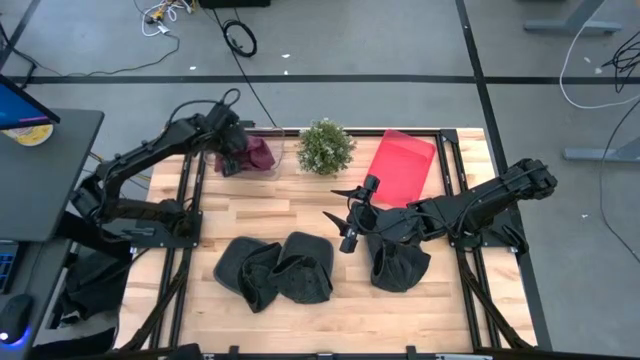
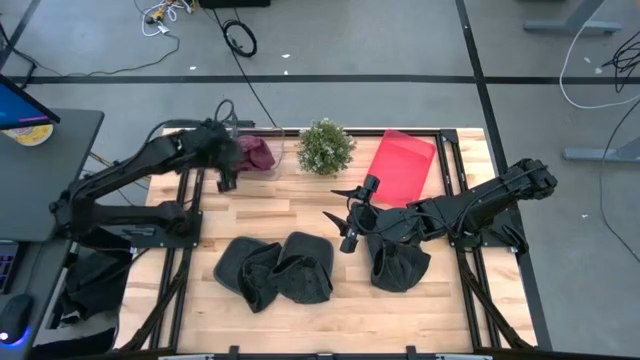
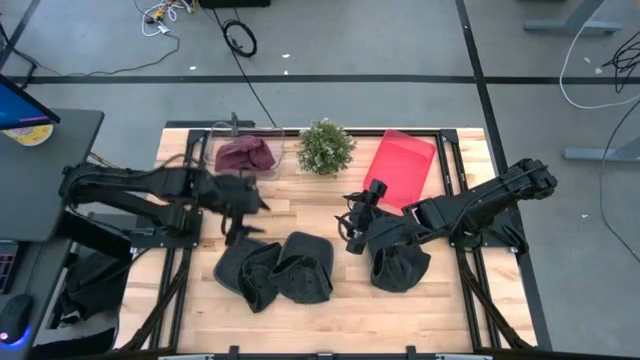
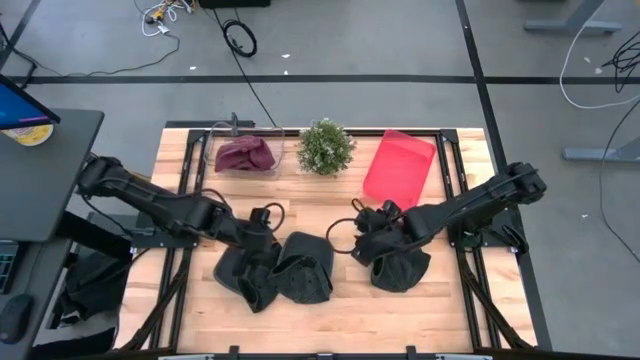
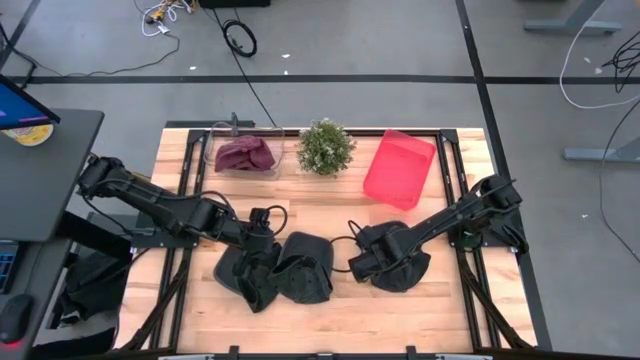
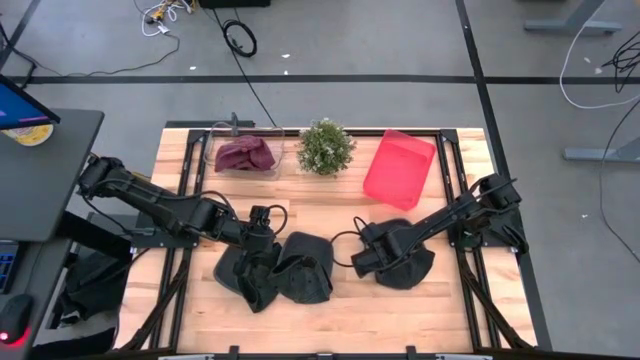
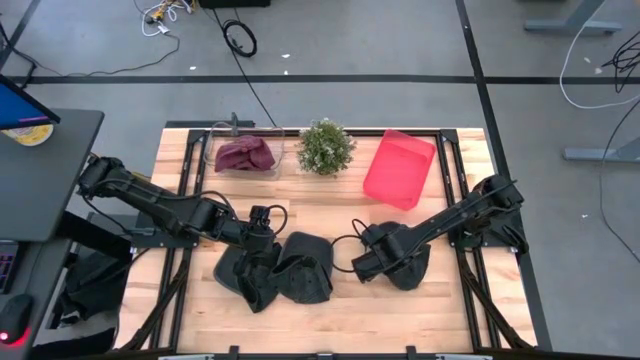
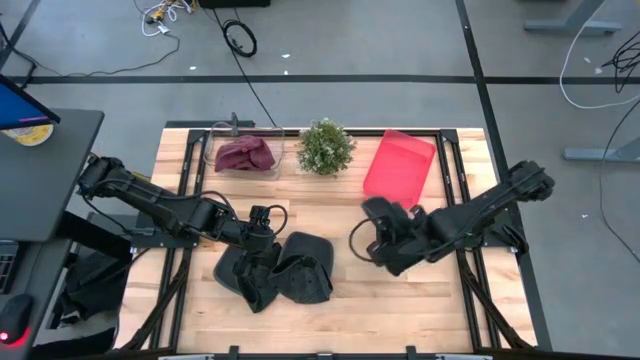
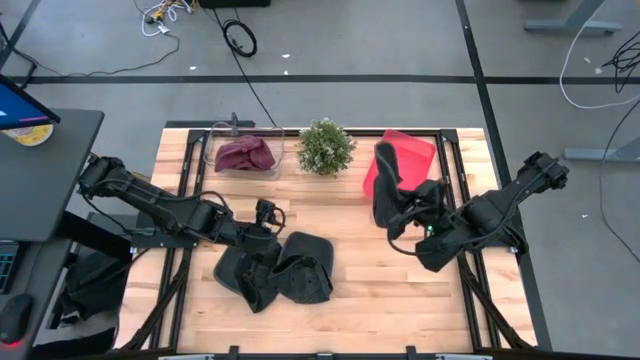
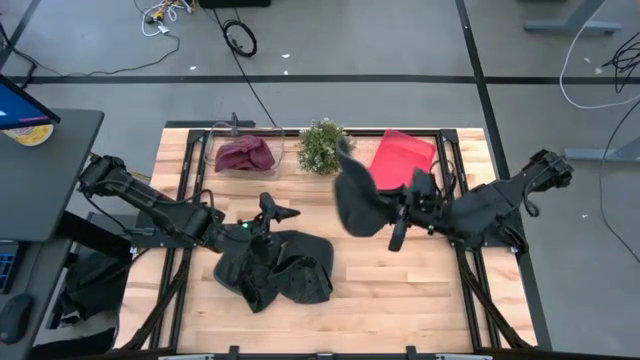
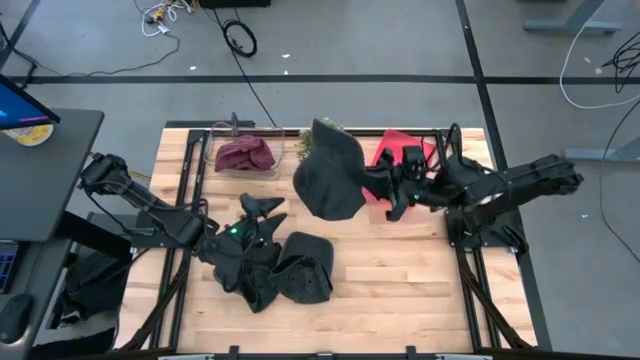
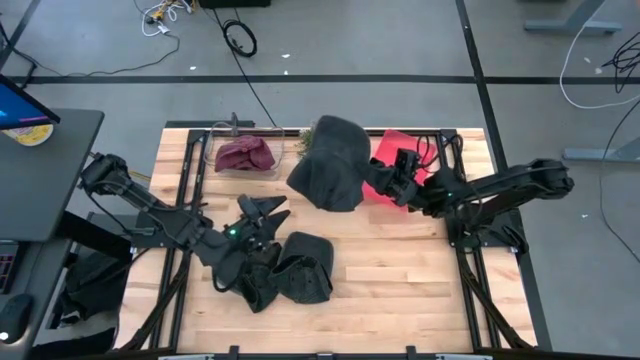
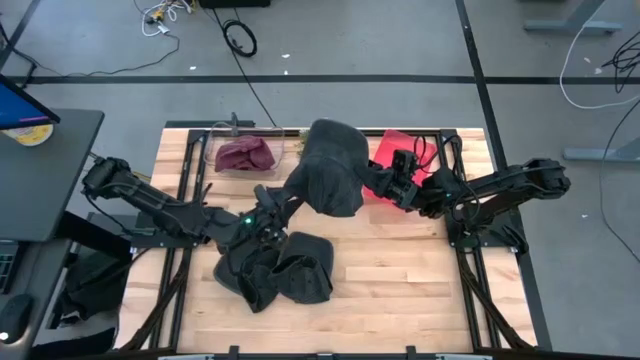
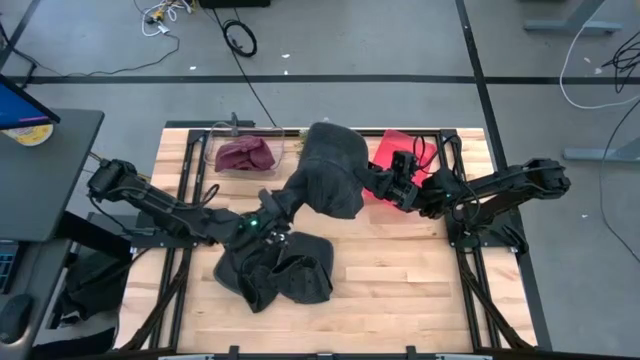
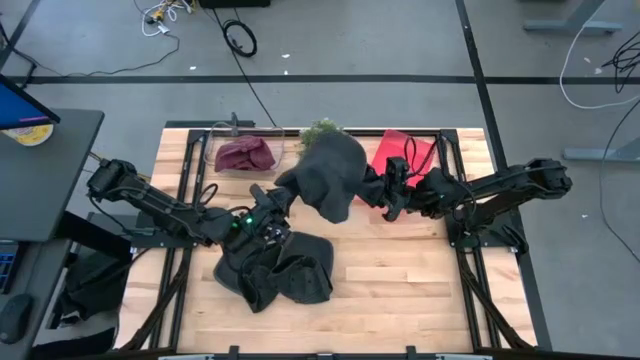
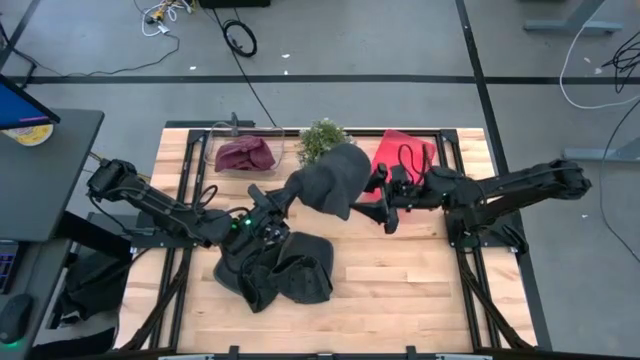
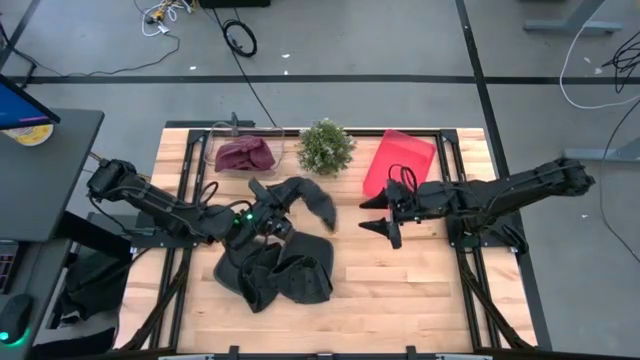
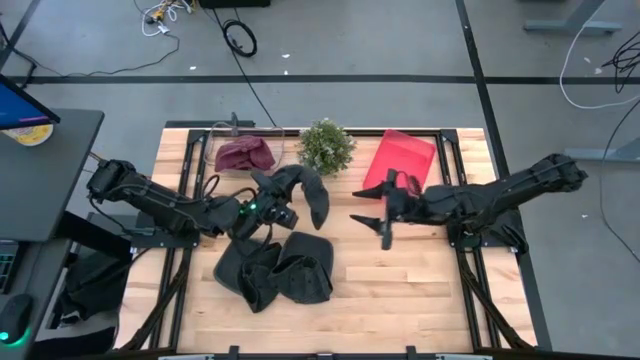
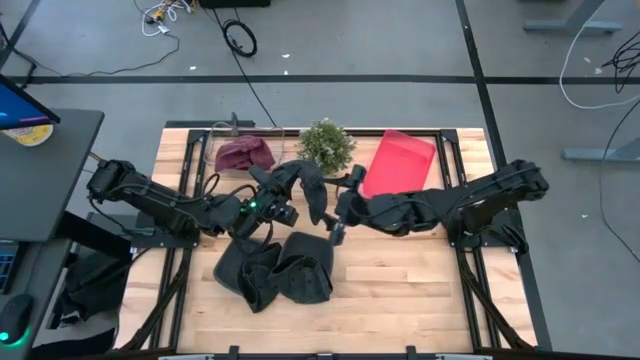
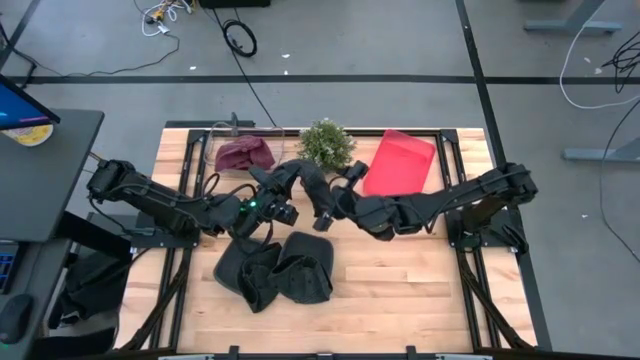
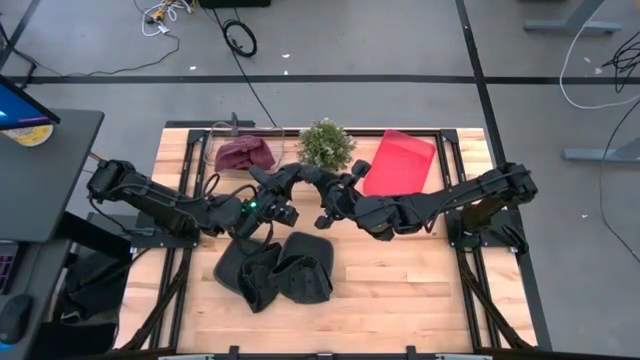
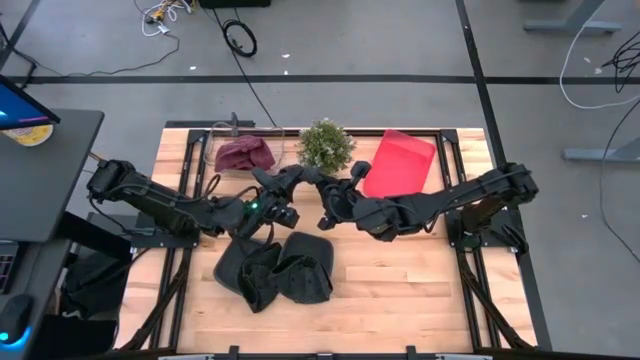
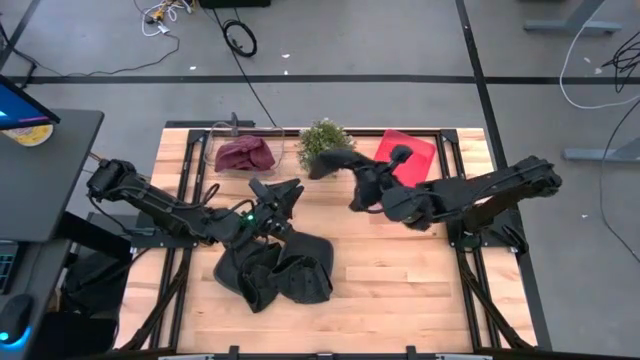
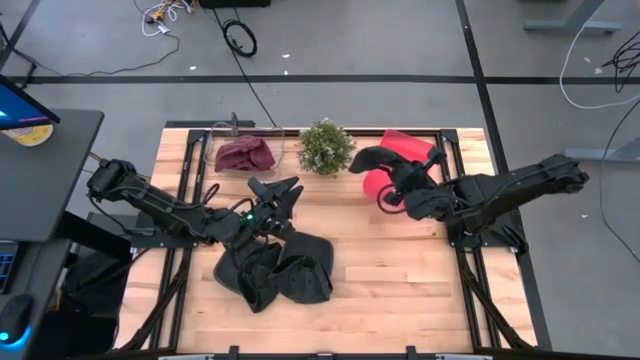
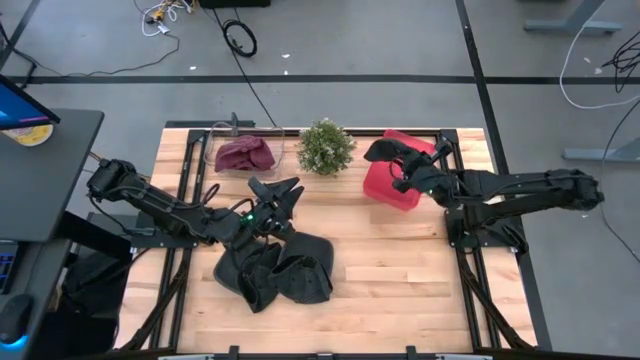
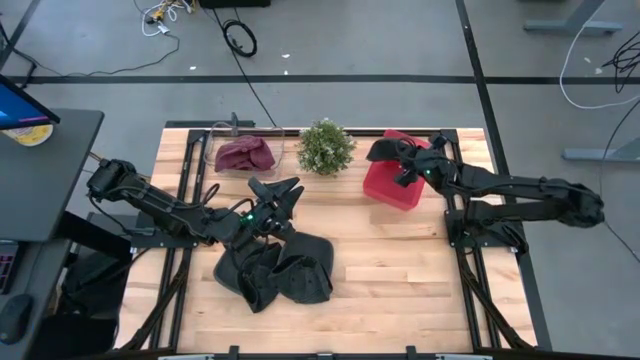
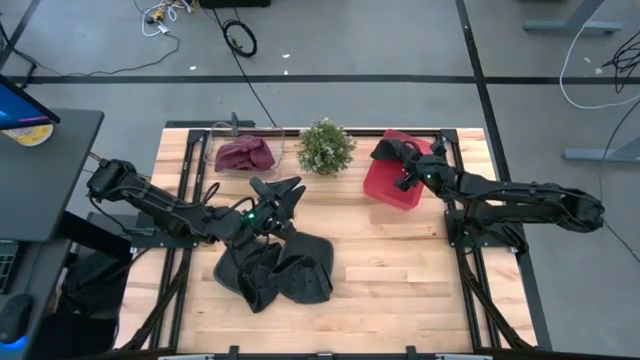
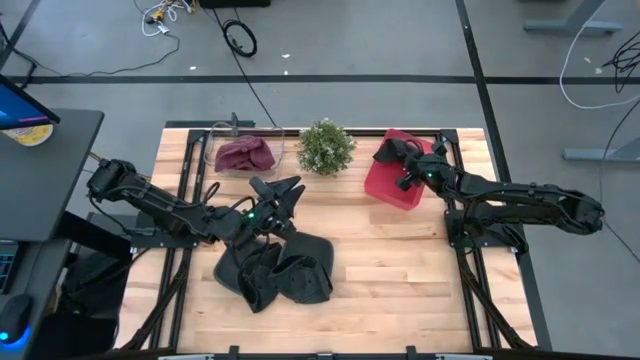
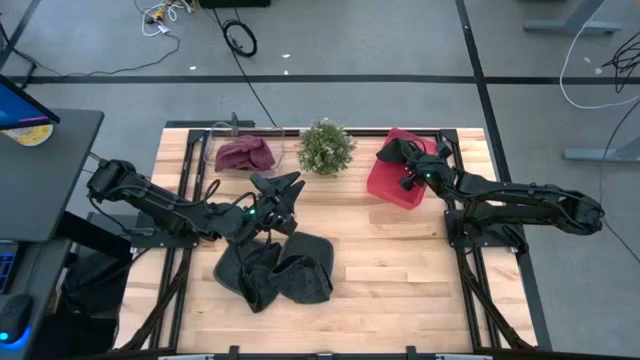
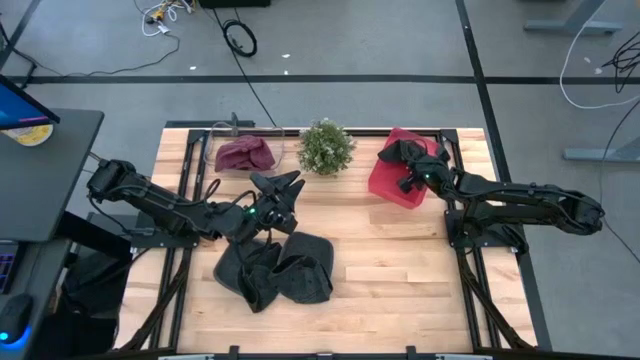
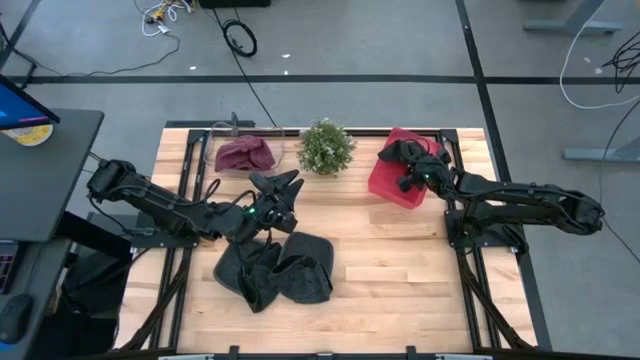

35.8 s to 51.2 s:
Task: Pick & Place hat
Put the right black cap into the red bin

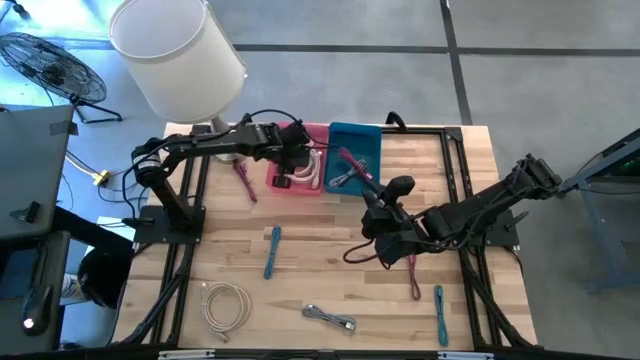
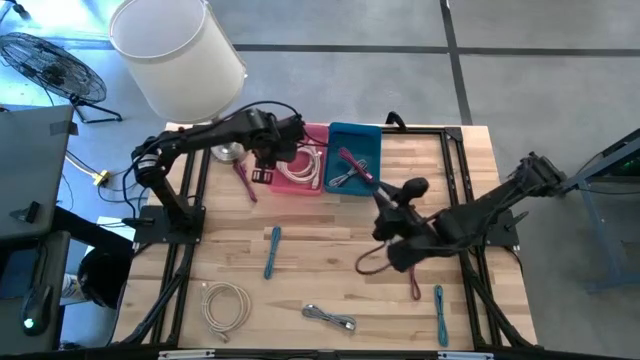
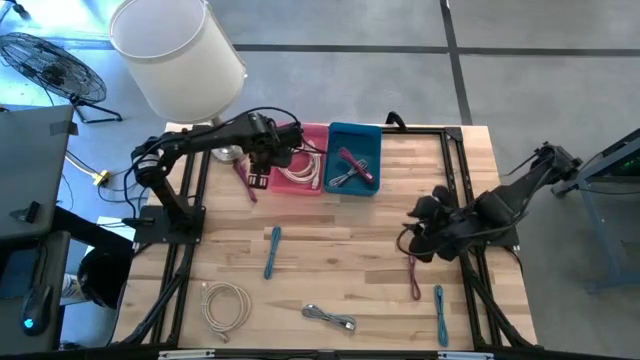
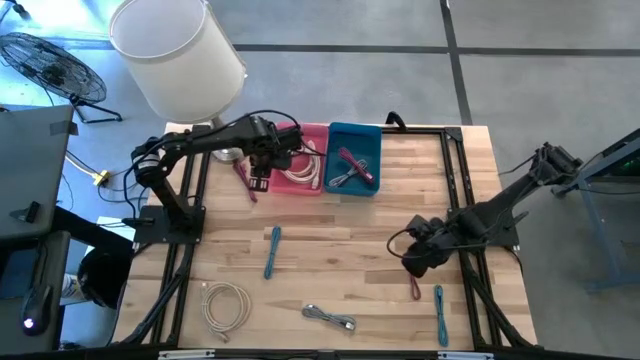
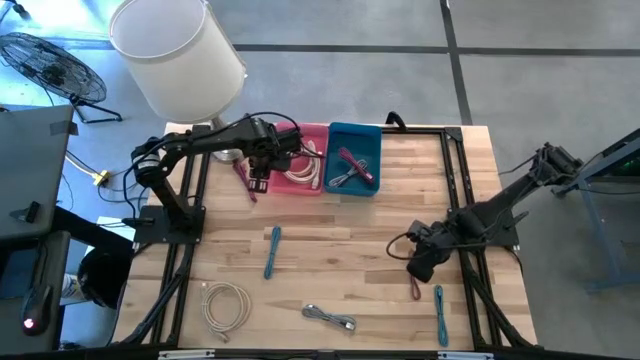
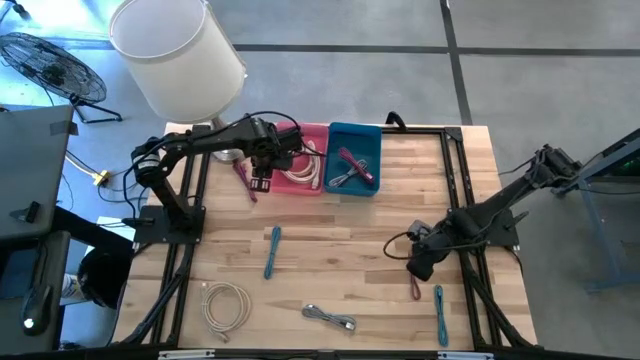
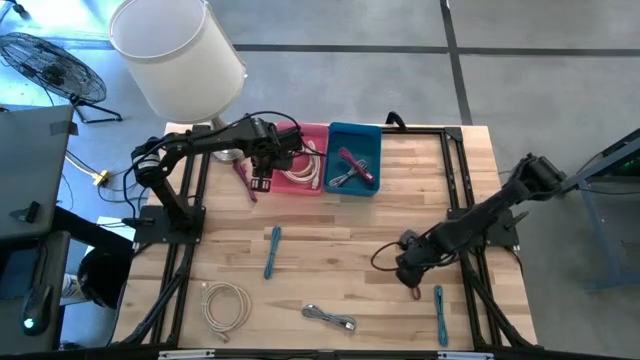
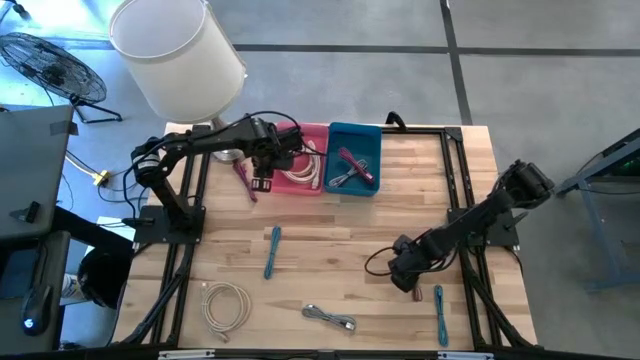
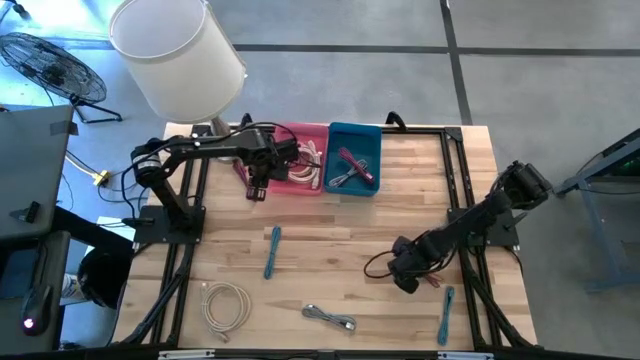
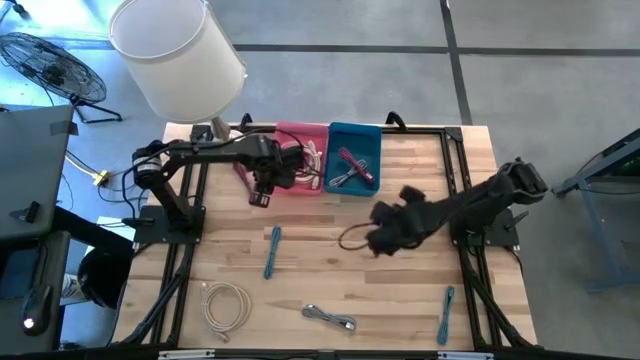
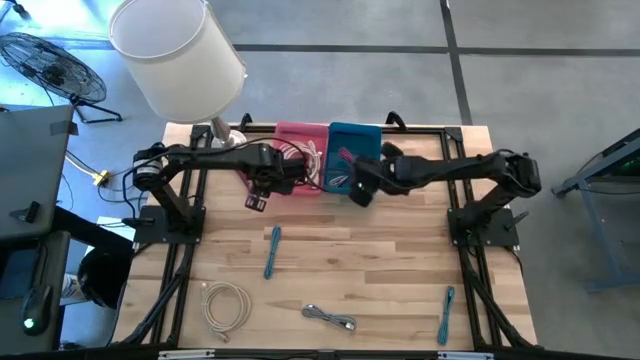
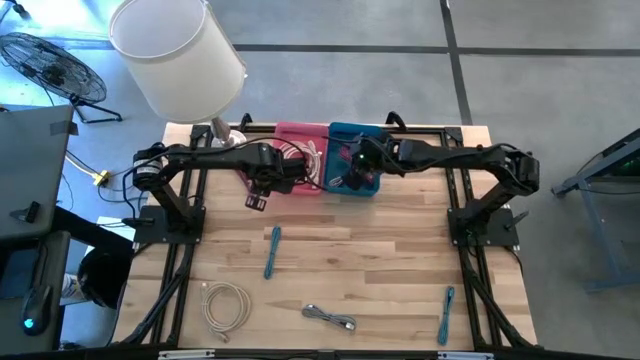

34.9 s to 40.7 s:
Task: Pick & Place USB Port
Put the bottom pink charger cable into the blue bin
